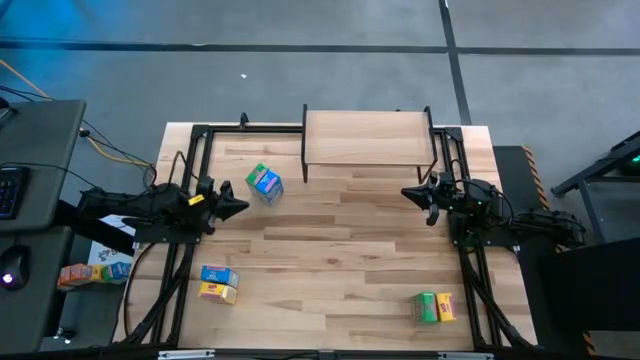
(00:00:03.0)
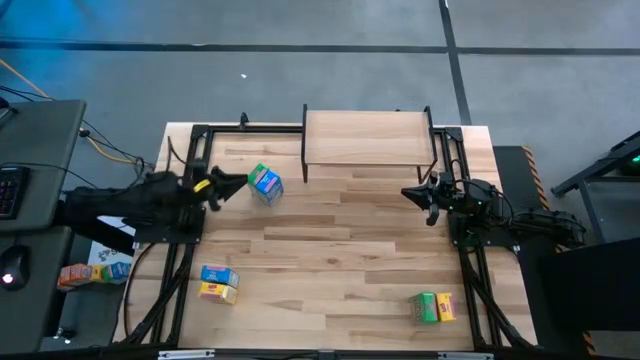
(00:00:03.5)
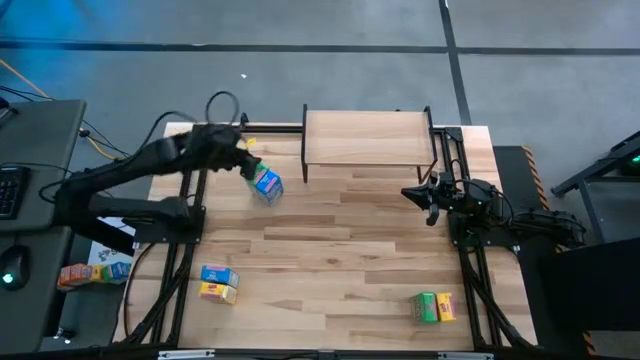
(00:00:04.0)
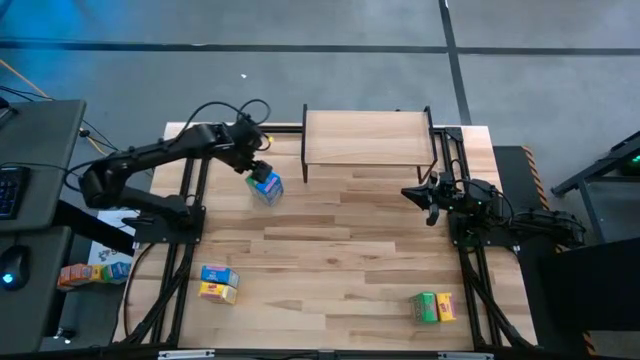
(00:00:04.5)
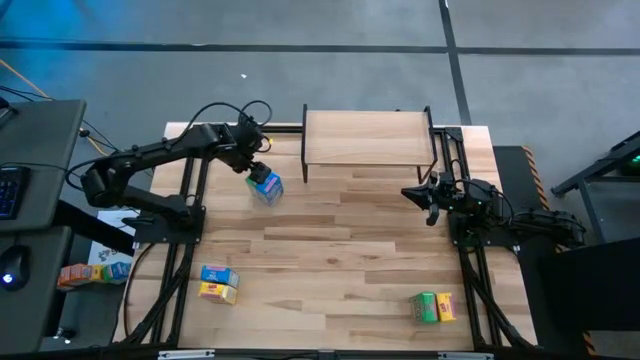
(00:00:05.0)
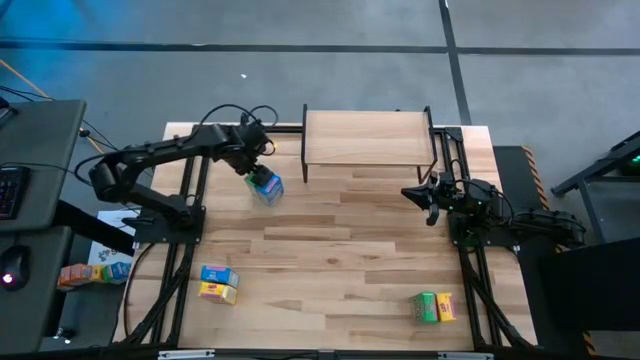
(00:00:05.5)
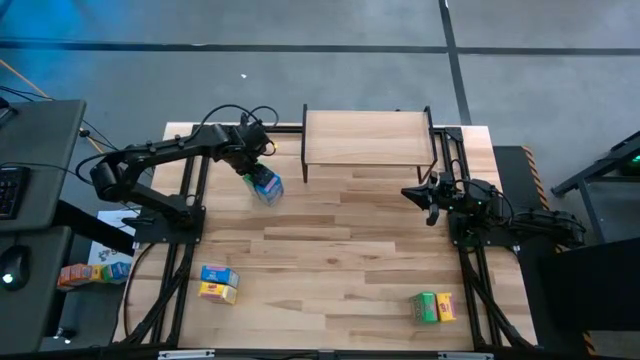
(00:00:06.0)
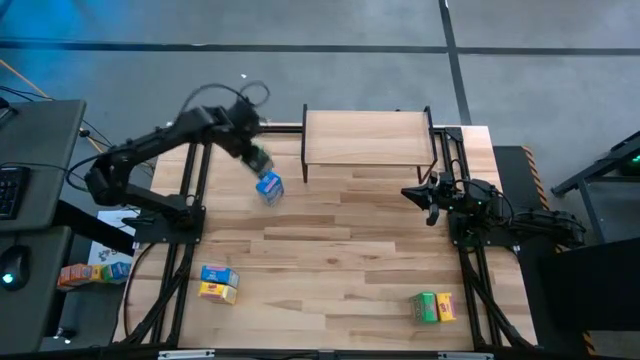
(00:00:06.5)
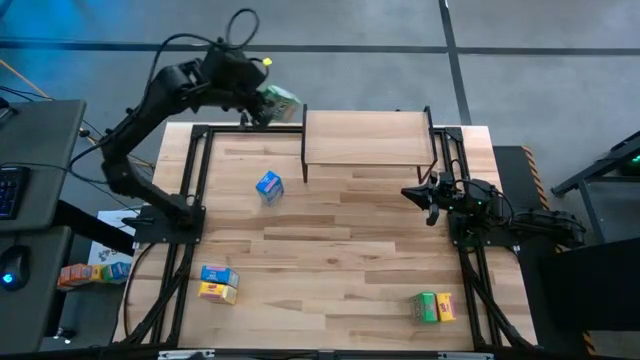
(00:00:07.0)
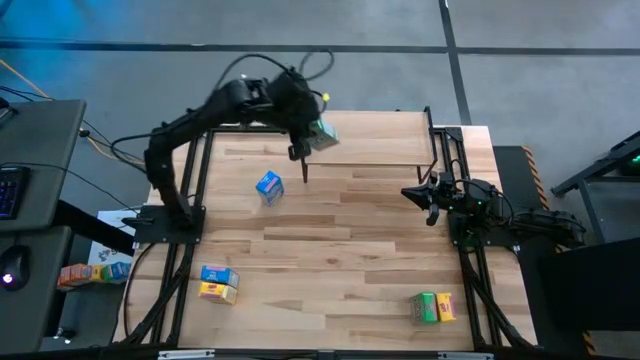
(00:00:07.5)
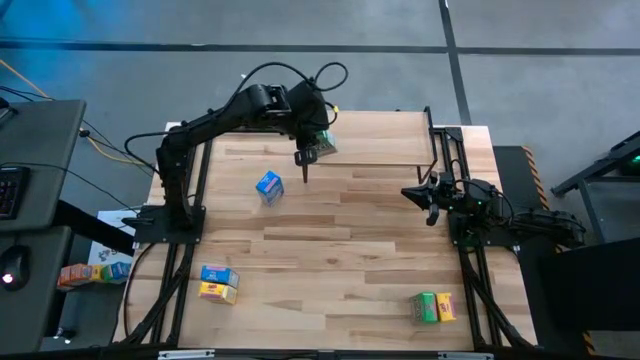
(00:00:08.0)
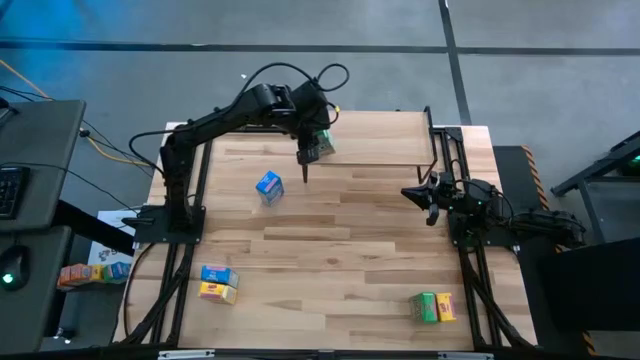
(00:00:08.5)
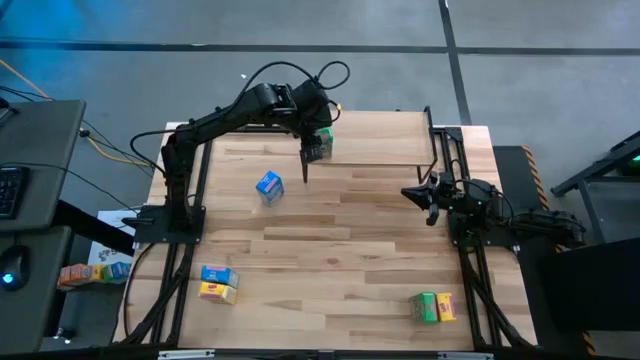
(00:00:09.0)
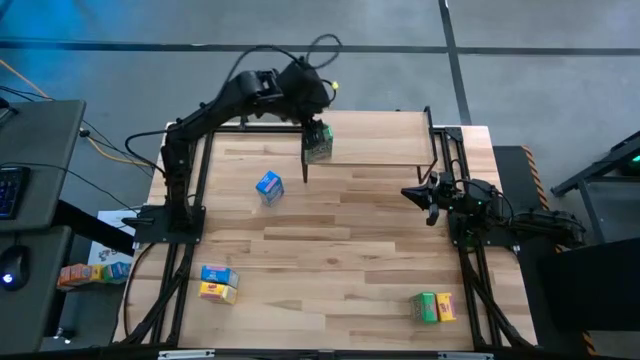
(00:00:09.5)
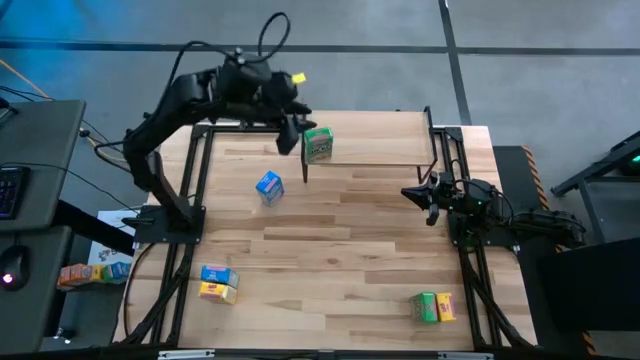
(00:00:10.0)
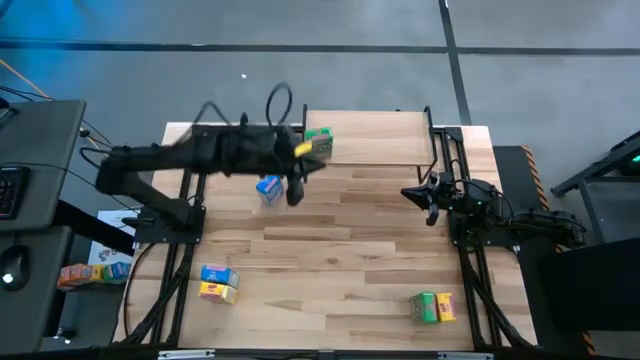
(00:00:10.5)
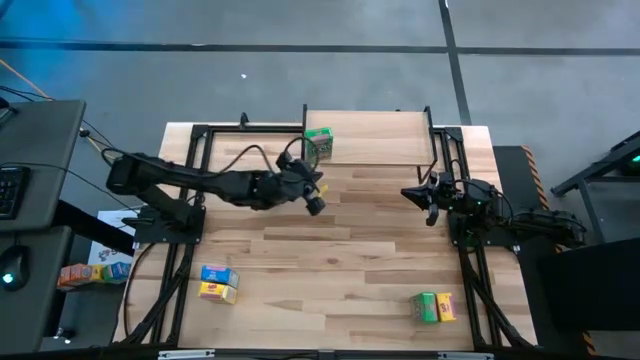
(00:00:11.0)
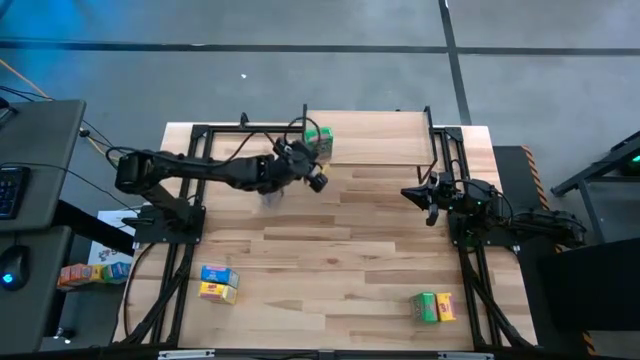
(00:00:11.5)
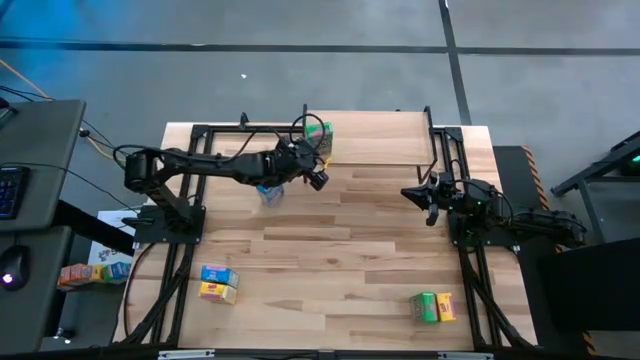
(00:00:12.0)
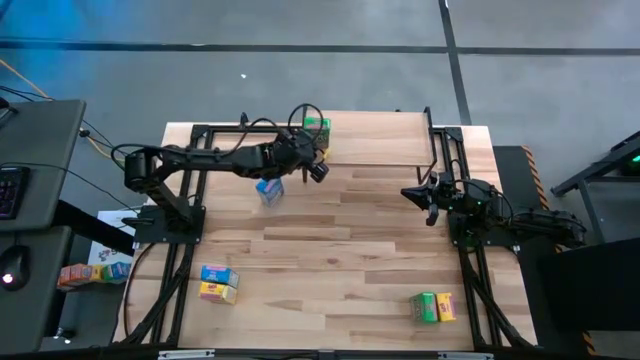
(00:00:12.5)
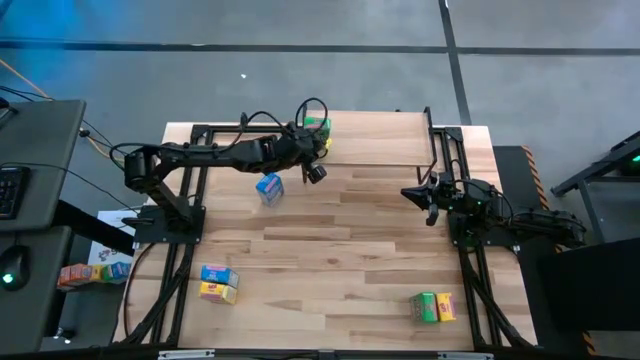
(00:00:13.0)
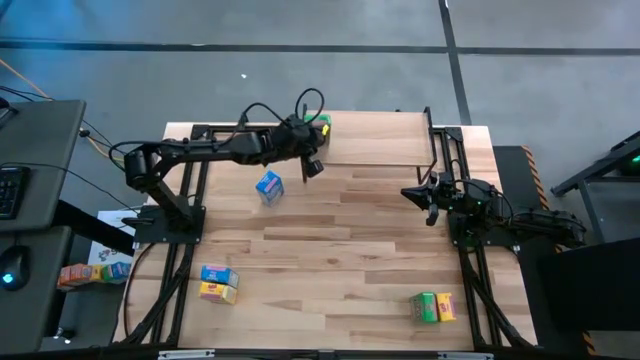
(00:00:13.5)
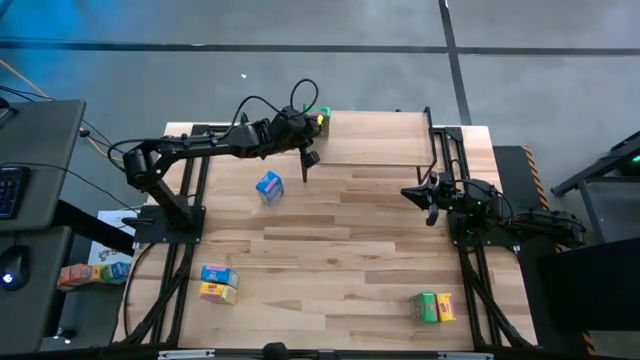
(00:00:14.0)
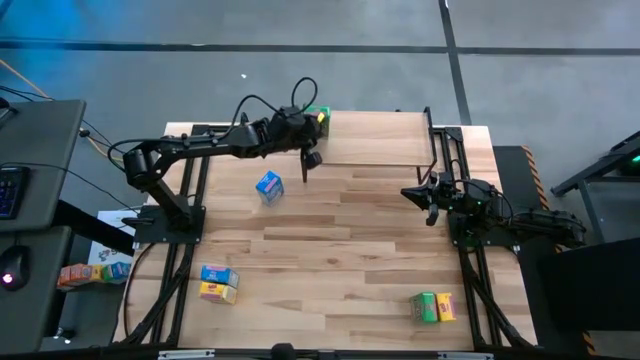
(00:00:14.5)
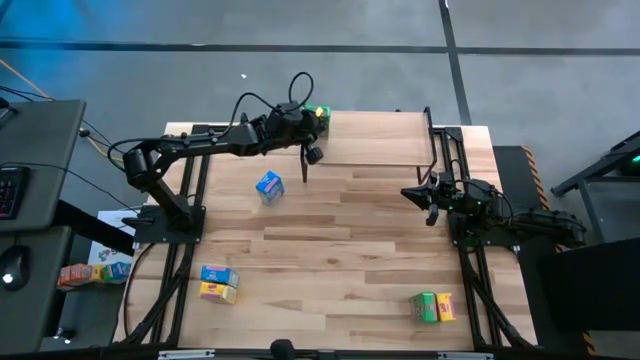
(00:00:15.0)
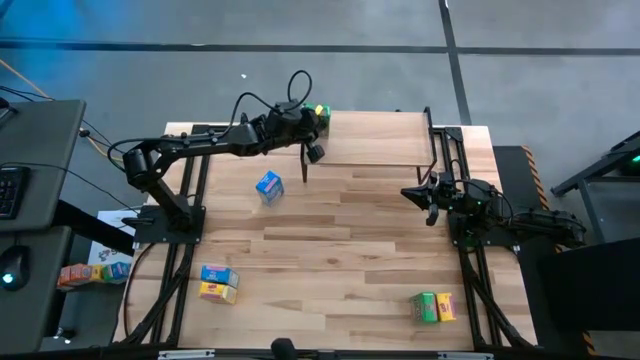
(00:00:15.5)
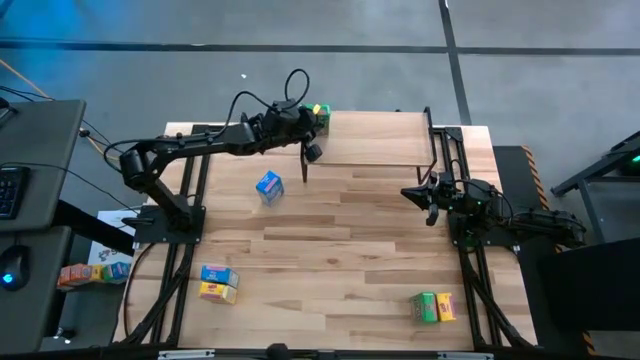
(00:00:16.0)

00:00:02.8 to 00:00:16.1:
Task: Stack cereal on shelf
Put the top green cereal box on the shelf

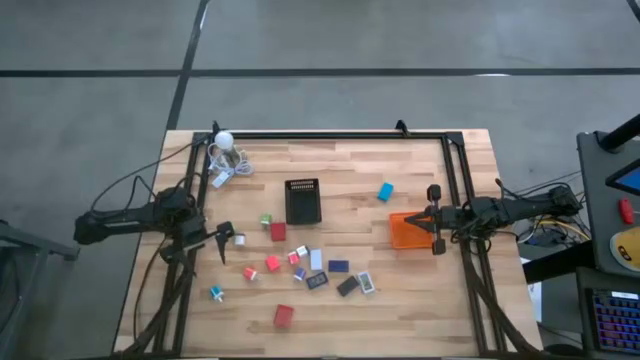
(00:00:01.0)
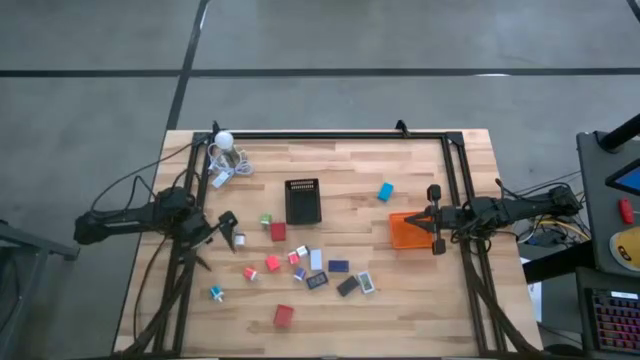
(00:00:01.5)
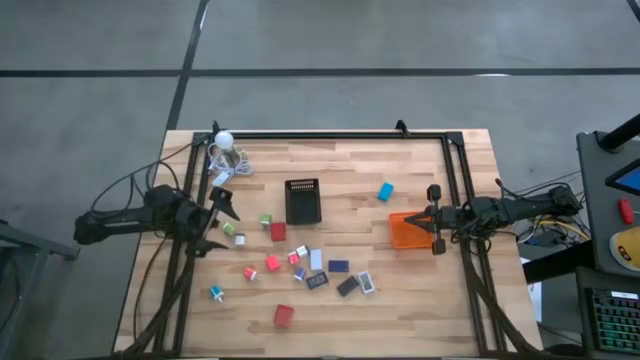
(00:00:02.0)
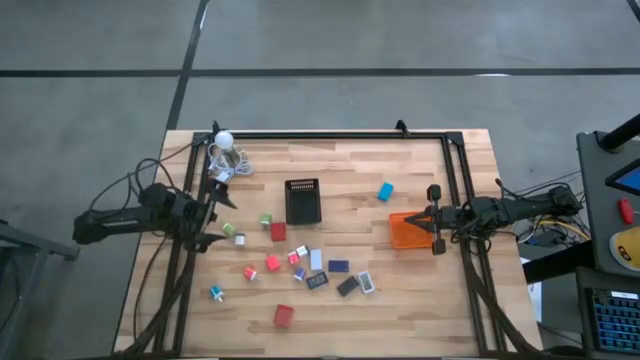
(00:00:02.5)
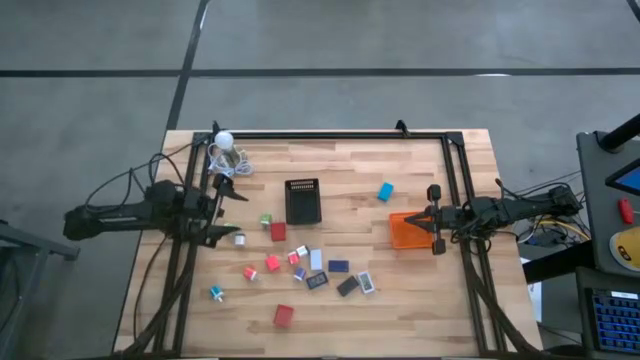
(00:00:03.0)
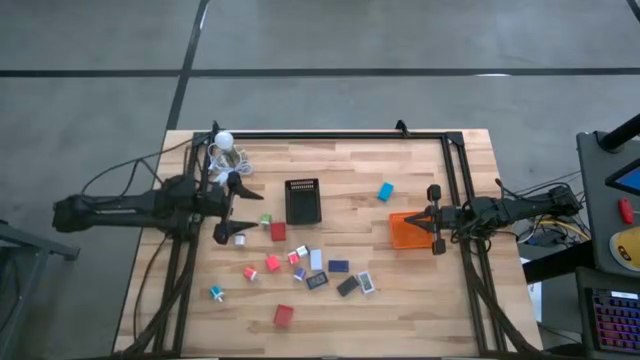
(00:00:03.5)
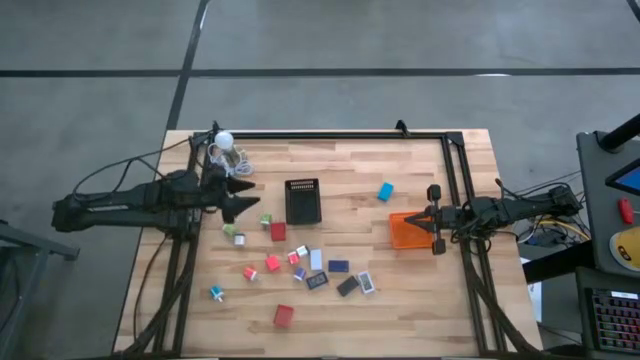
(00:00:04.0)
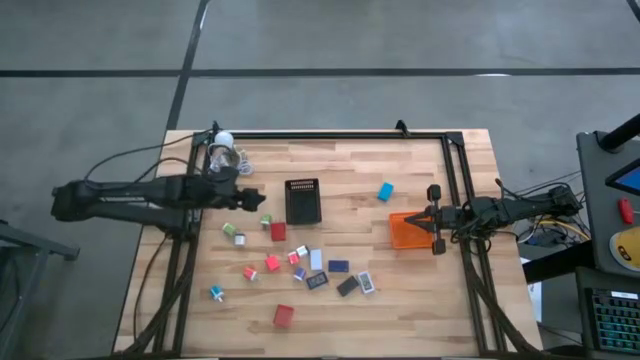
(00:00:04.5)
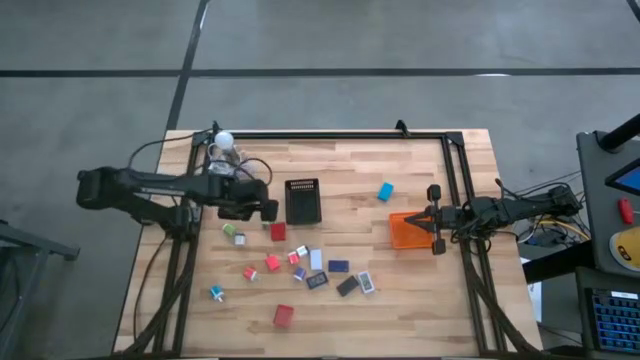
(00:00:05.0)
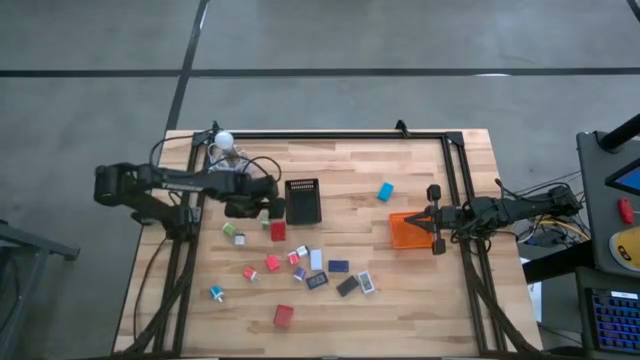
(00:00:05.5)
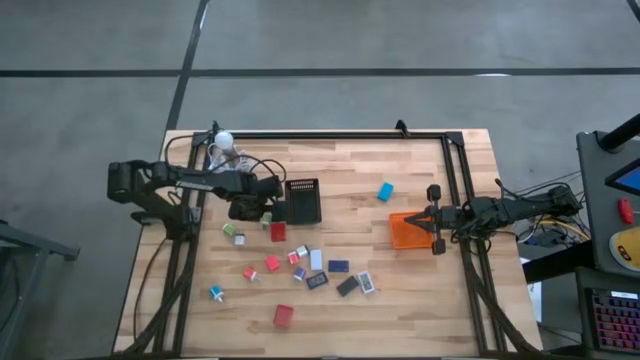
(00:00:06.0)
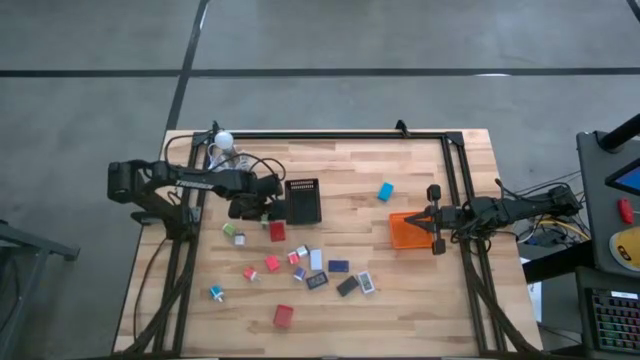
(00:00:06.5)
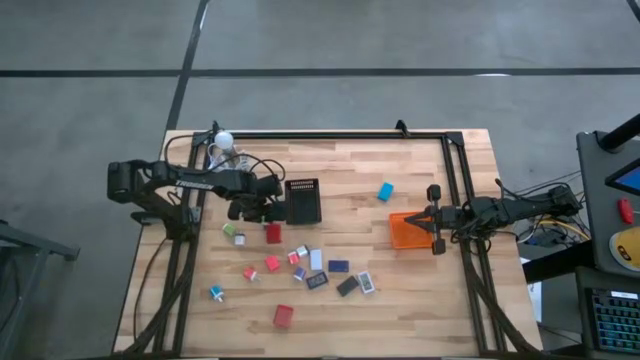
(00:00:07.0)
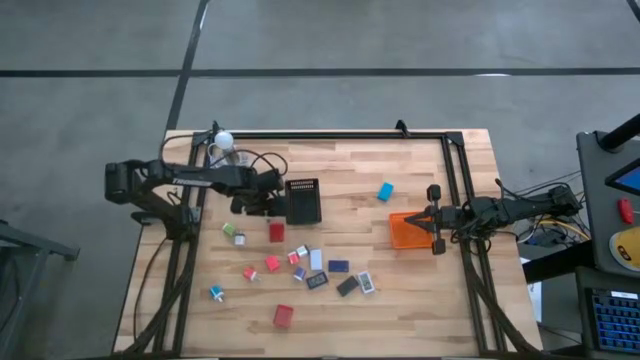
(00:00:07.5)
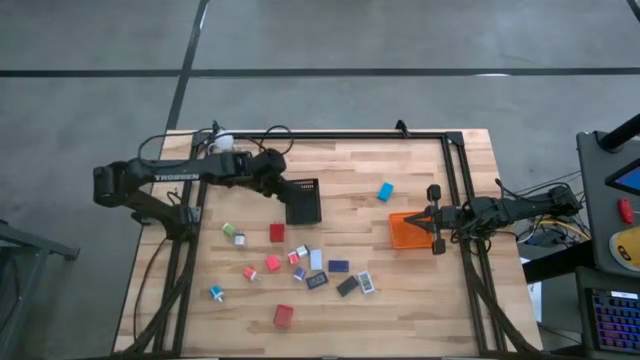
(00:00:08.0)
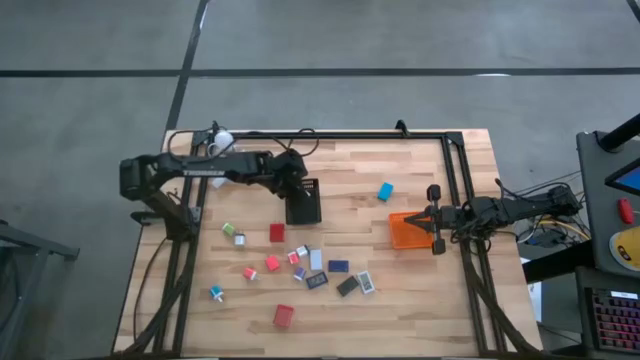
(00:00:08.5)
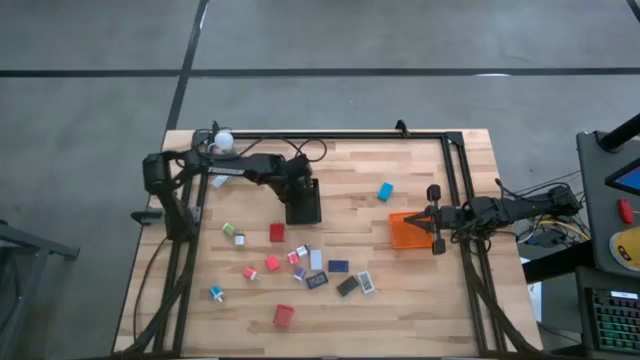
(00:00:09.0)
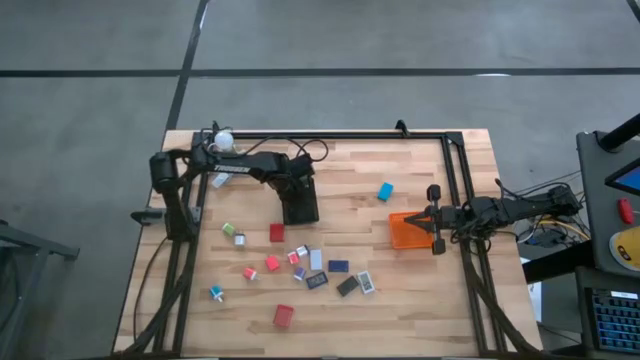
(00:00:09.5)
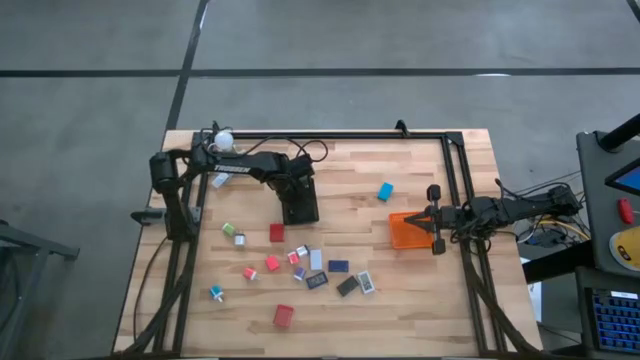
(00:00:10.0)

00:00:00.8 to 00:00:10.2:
Task: Pick & Place Office items
Put the right green charger adapter in the black bin
